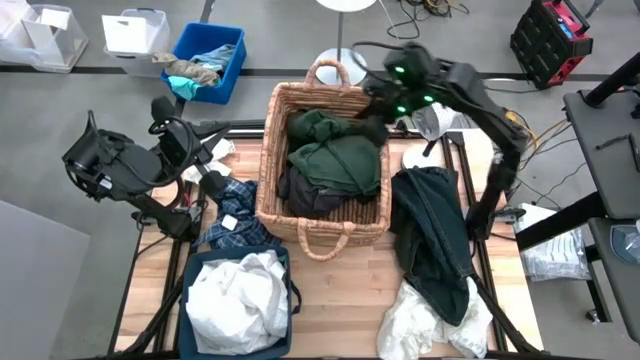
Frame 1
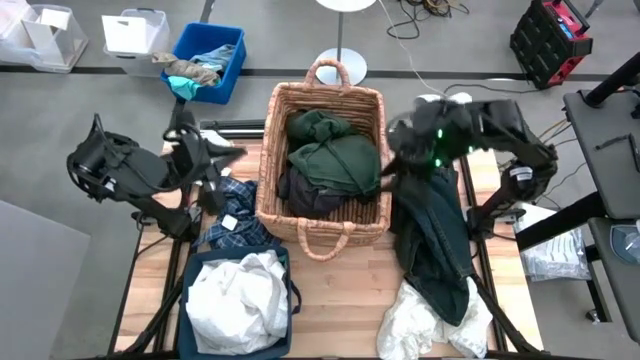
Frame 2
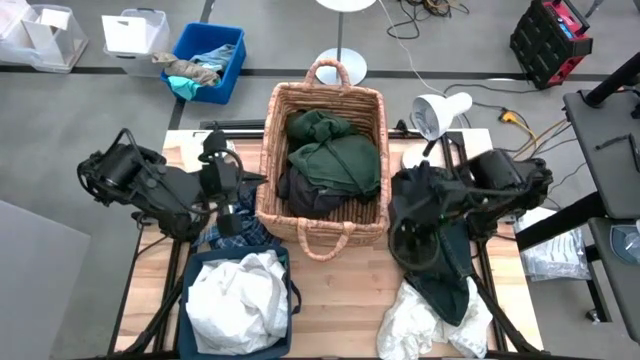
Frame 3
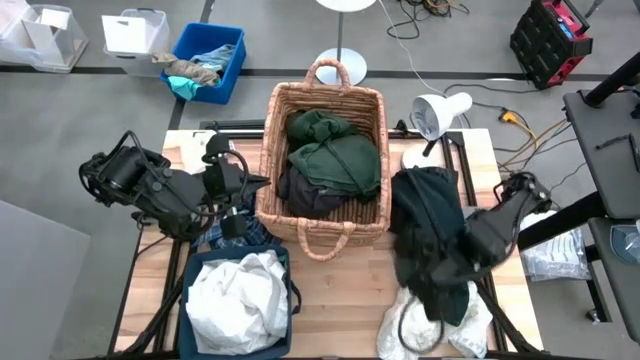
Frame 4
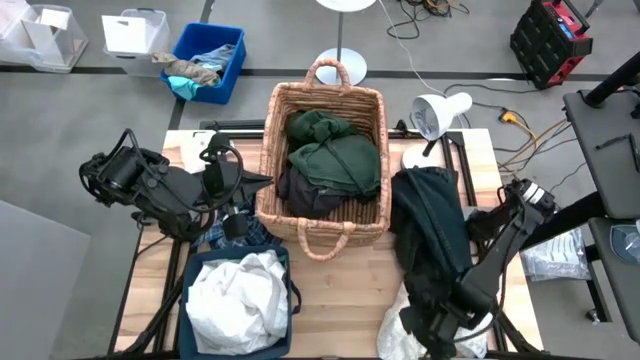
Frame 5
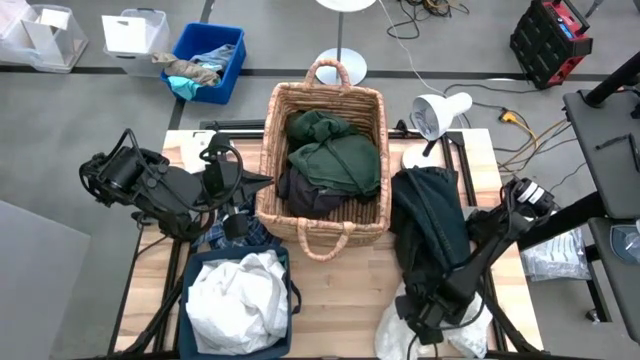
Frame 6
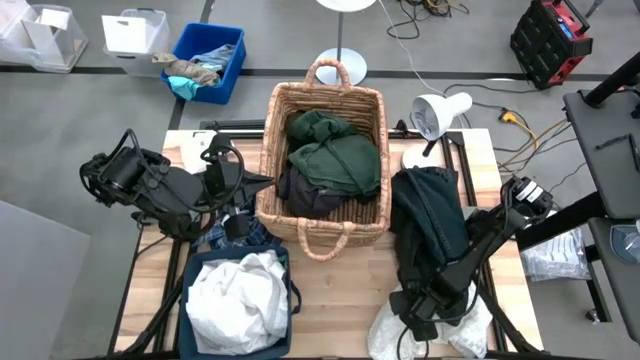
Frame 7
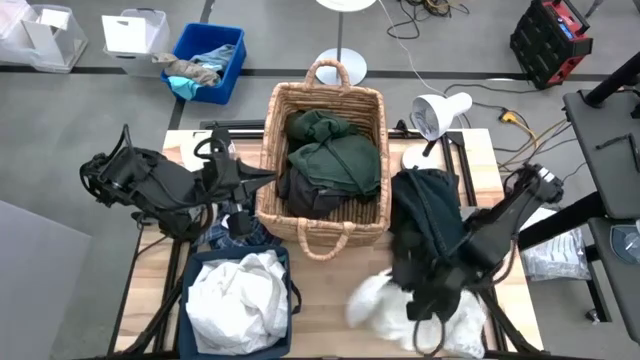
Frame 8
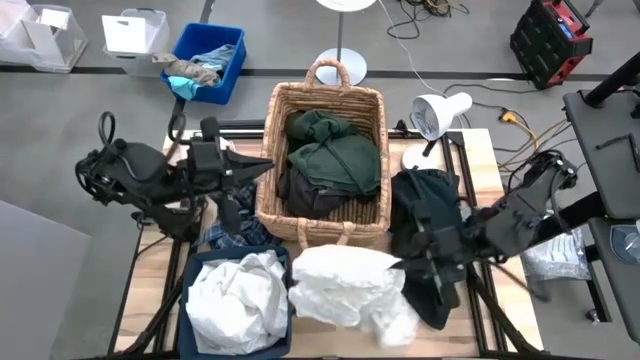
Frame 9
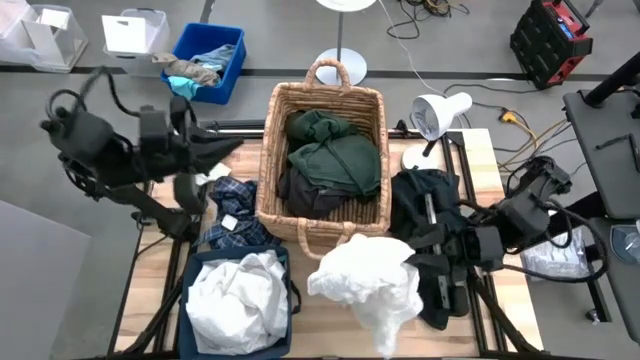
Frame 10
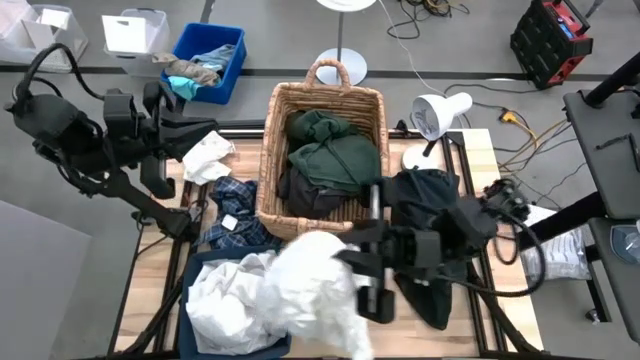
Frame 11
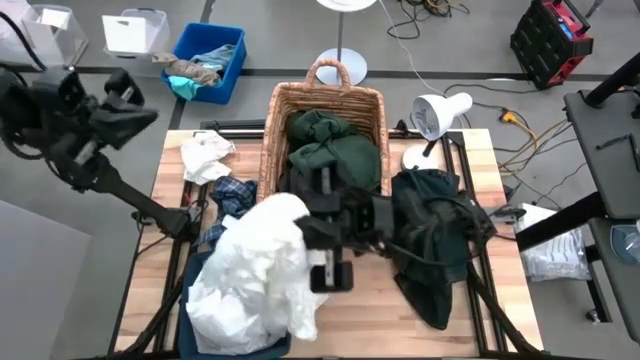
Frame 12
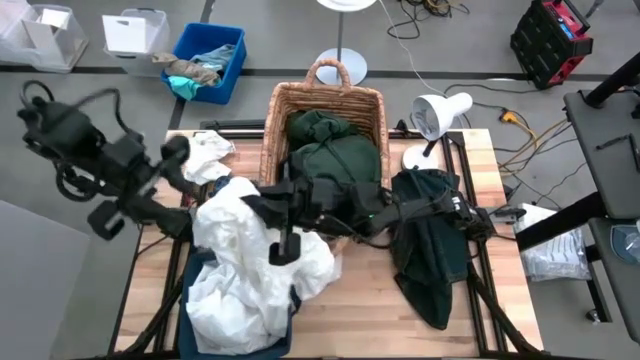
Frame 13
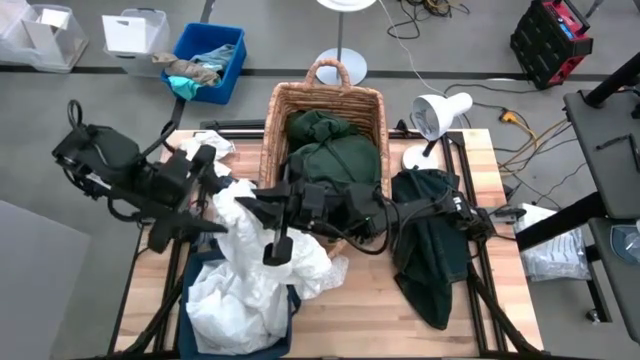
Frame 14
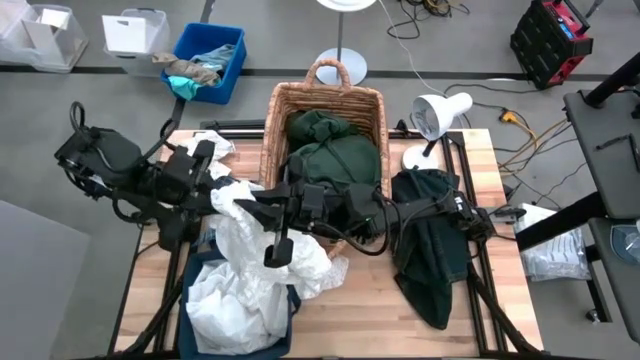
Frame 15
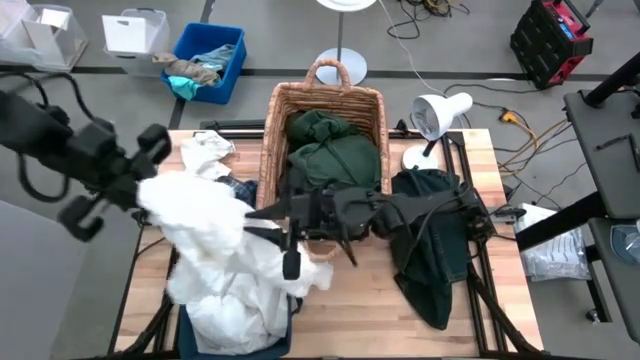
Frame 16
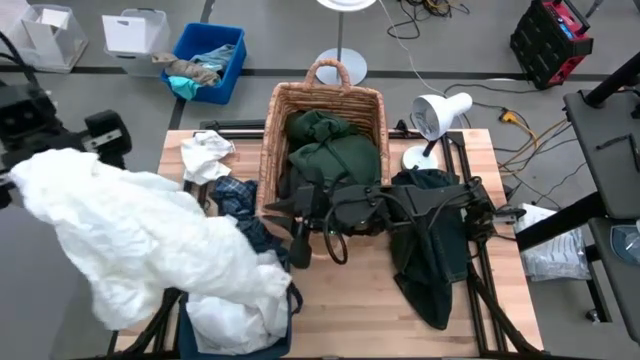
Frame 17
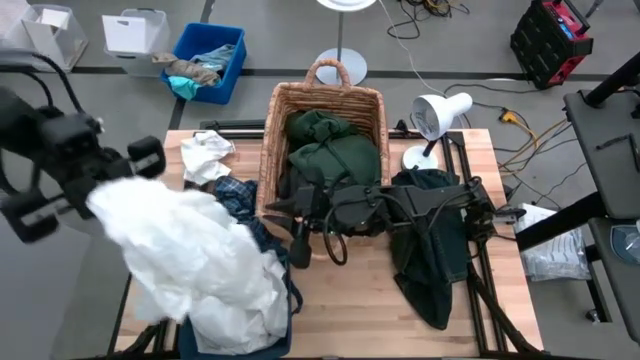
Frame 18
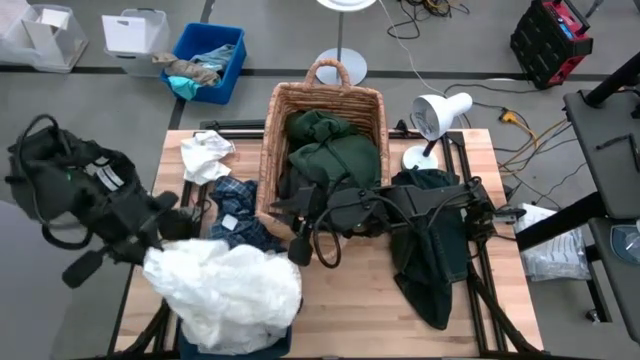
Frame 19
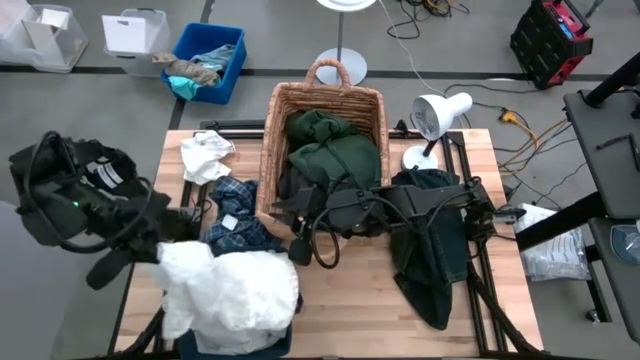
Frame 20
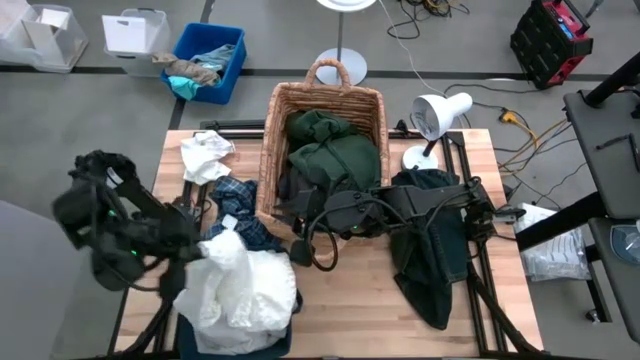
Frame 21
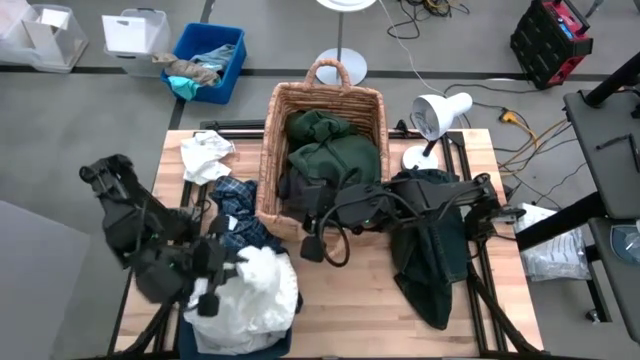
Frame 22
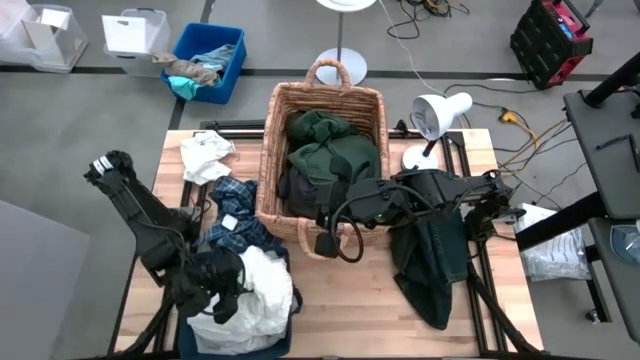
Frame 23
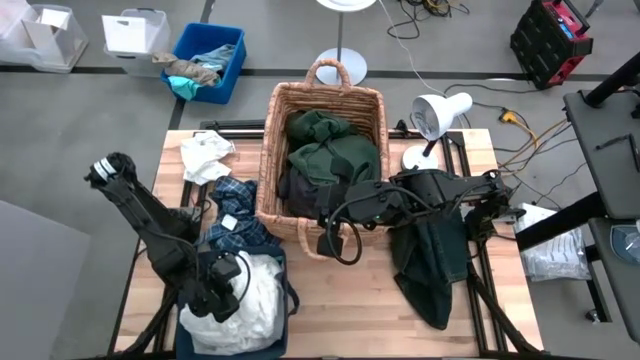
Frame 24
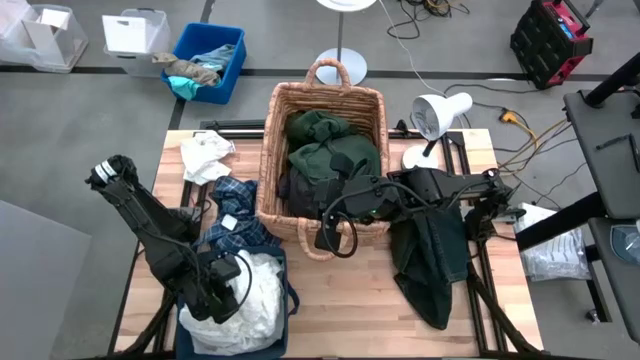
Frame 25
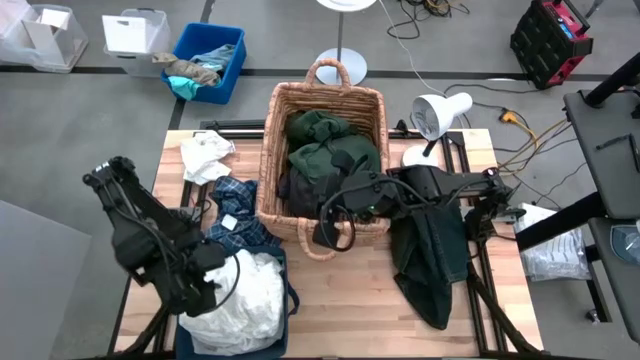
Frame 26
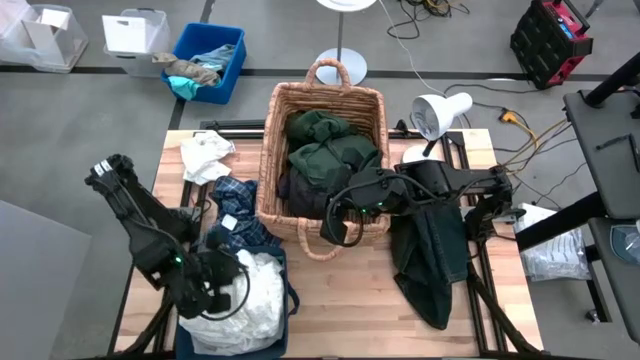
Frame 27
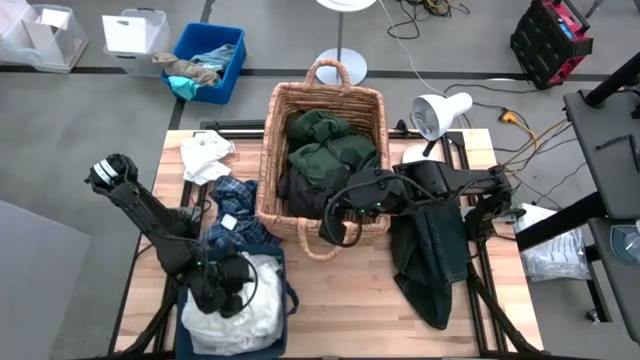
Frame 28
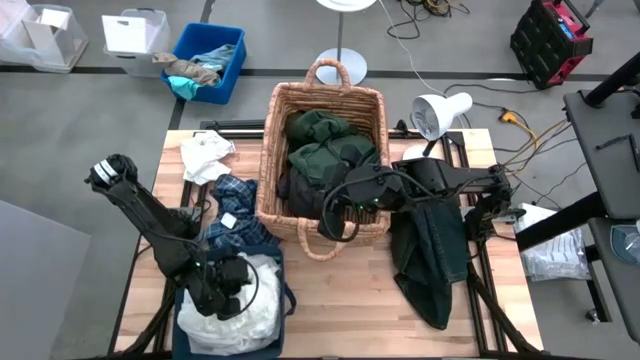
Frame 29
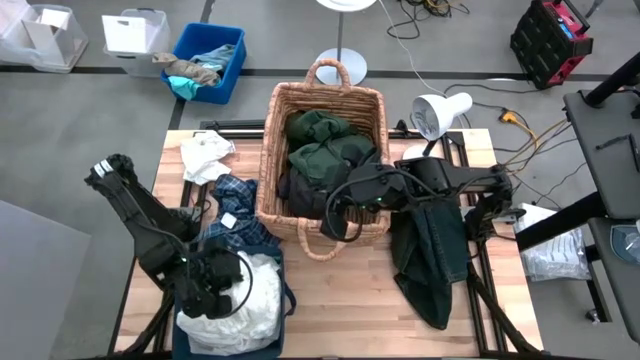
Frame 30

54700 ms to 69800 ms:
Task: Sort clothes
Put the white blouse into the blue laundry organizer

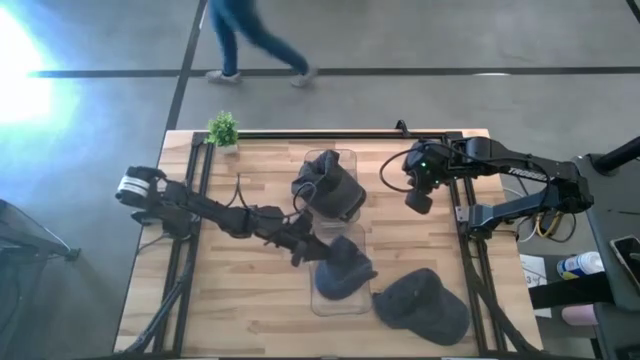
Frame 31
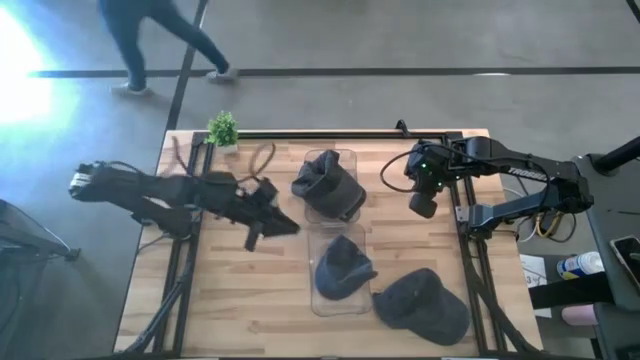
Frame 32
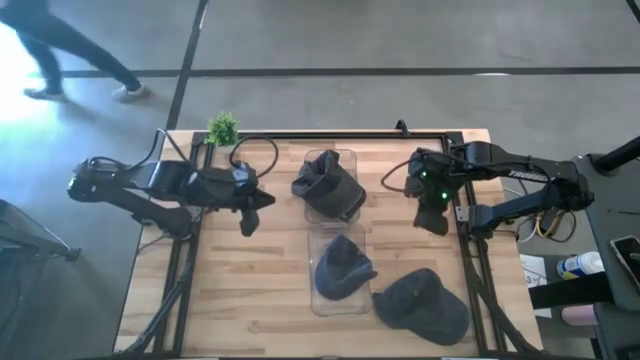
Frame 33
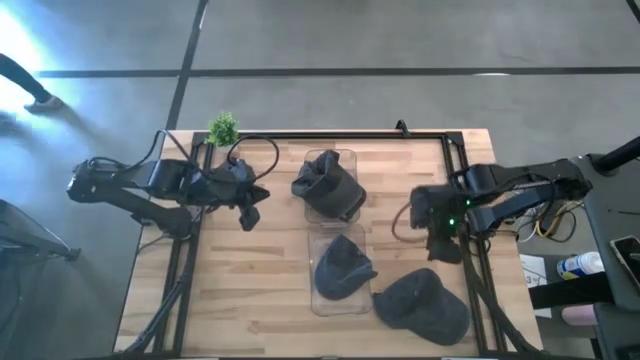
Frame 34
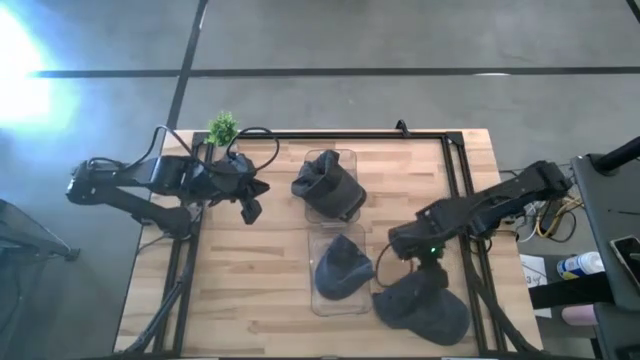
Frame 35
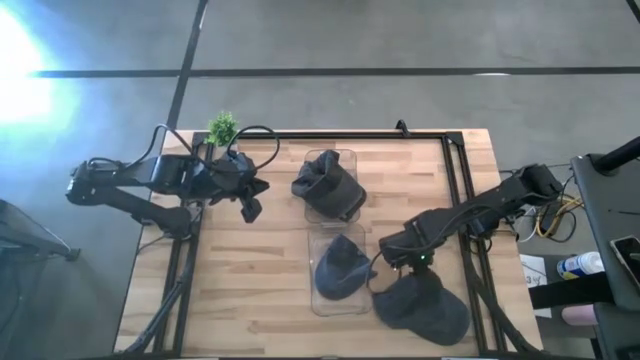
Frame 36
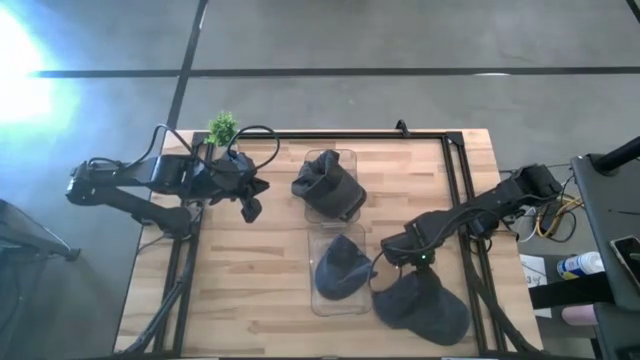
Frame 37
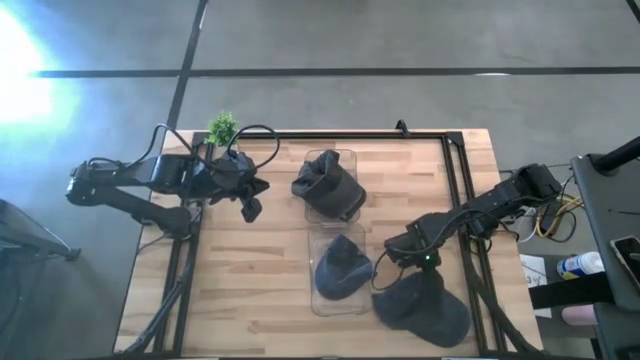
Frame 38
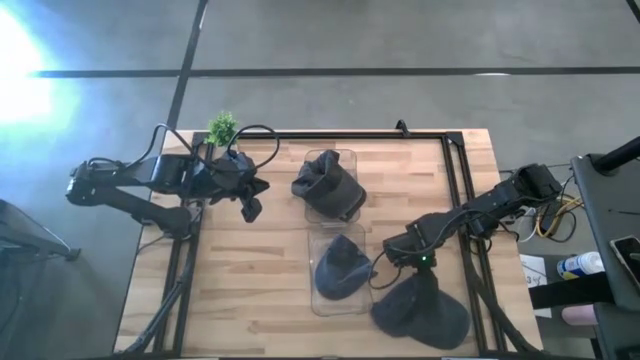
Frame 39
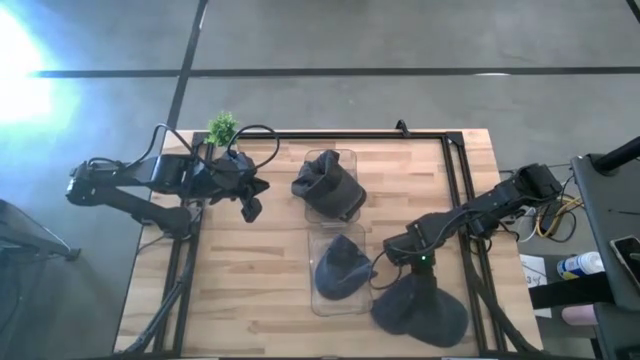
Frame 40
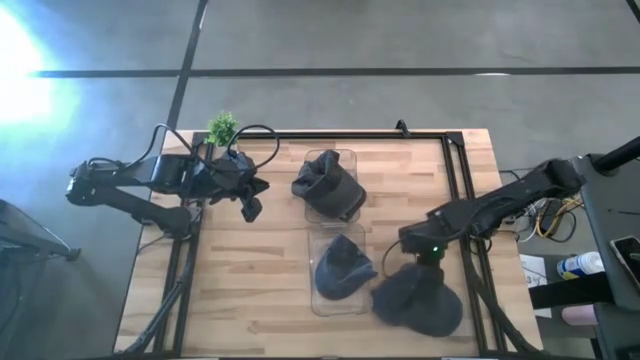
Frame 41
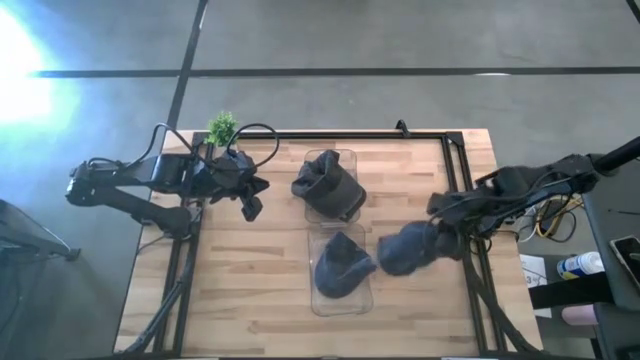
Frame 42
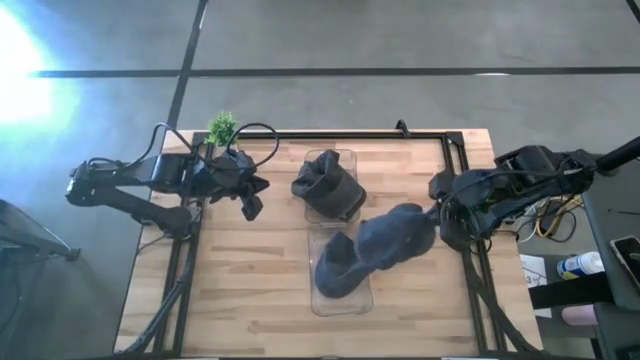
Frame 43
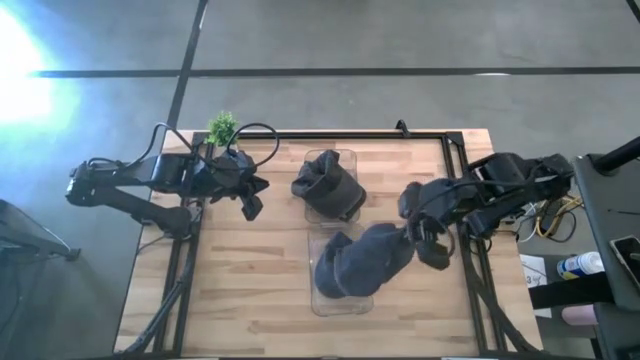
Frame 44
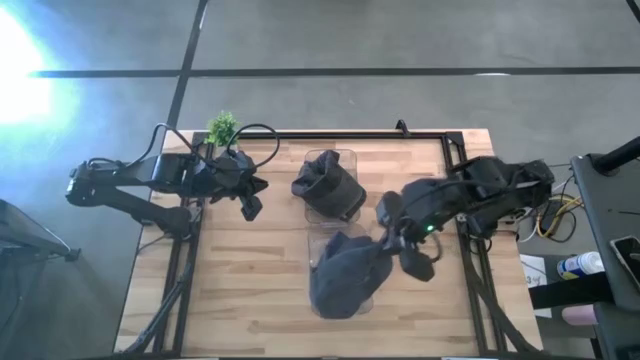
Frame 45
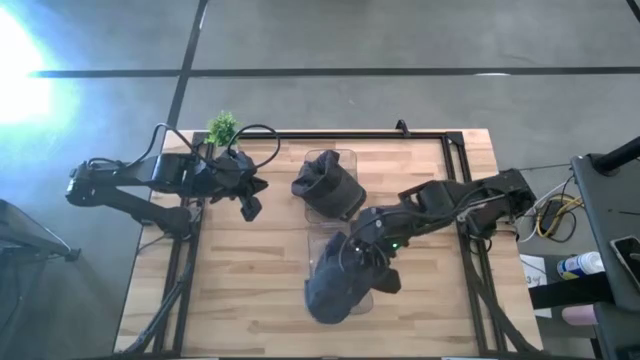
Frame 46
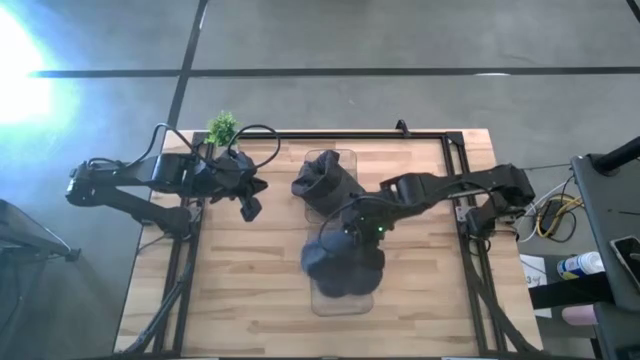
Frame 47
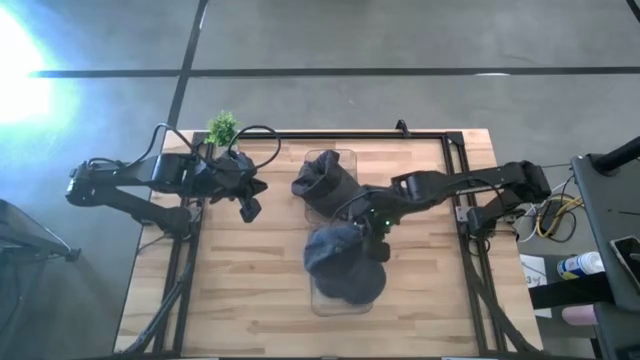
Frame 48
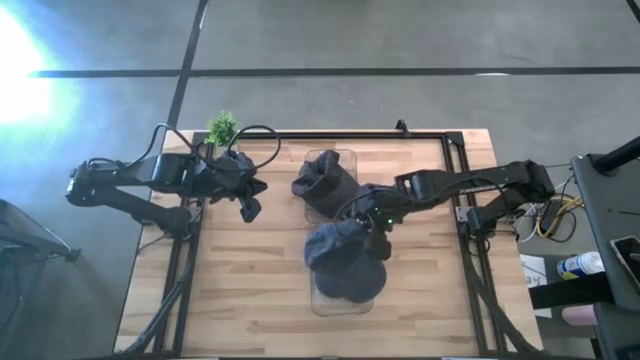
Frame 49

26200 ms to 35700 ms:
Task: Pick & Place hat
Put the blue cap into the bottom transparent bin
